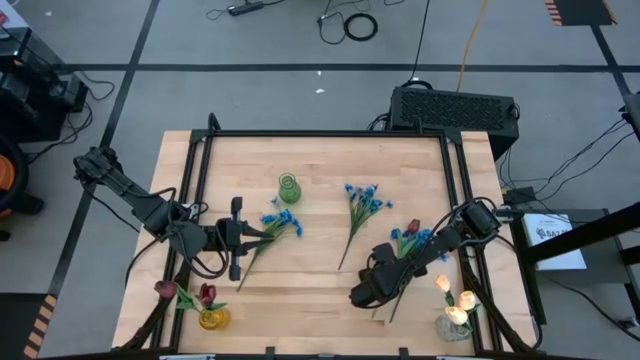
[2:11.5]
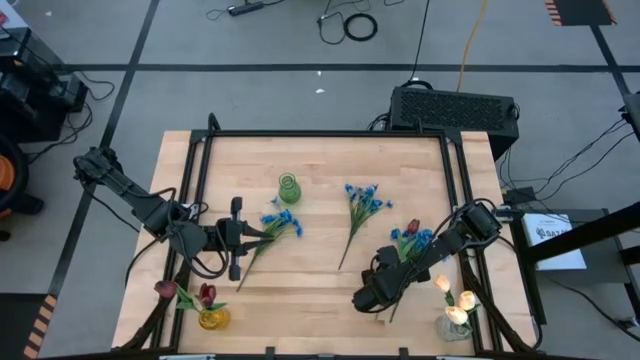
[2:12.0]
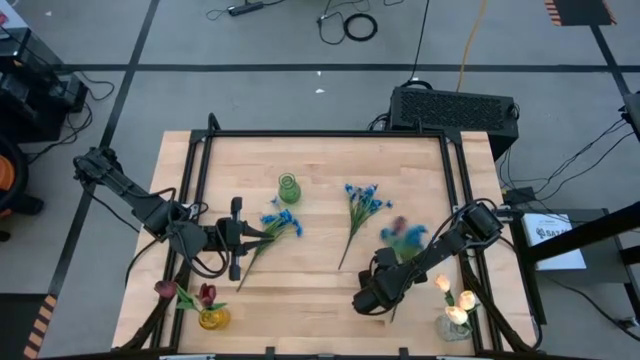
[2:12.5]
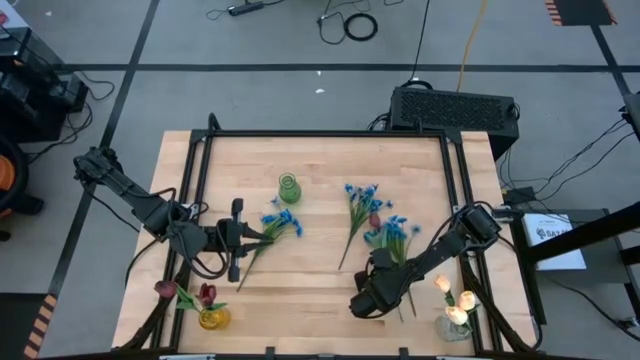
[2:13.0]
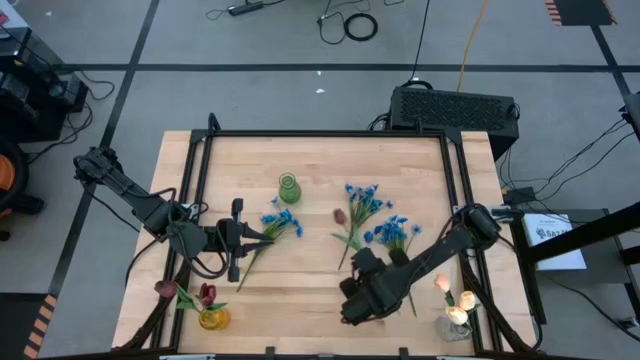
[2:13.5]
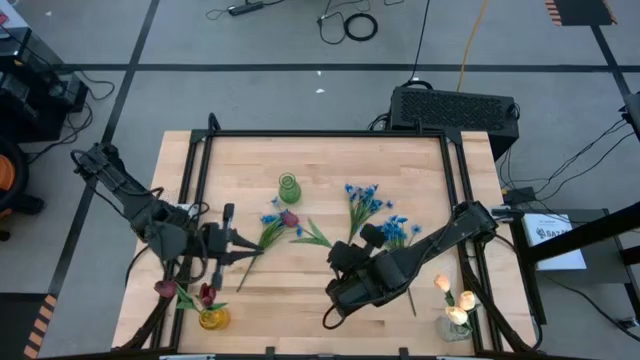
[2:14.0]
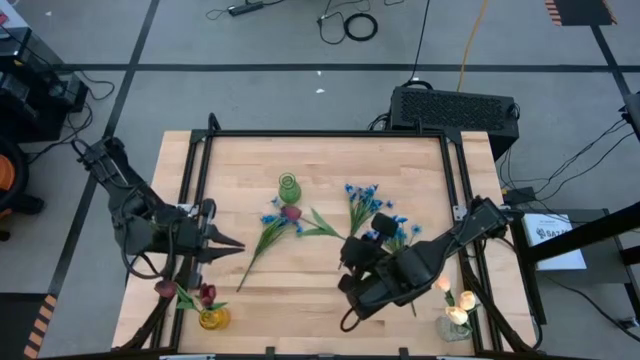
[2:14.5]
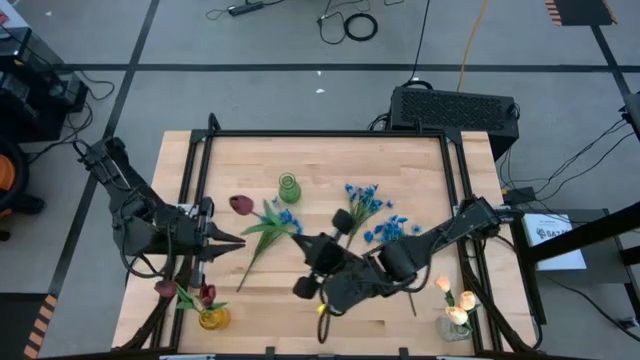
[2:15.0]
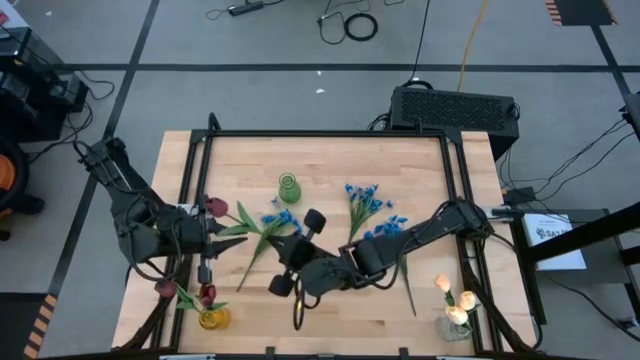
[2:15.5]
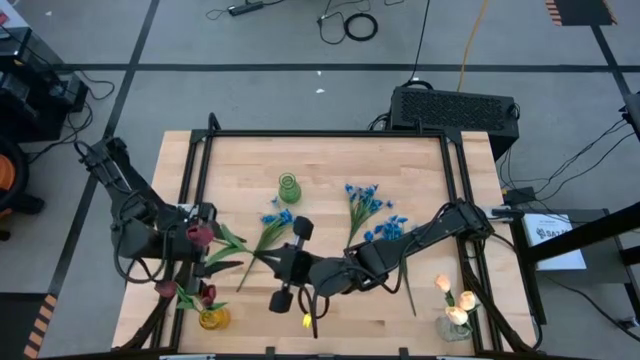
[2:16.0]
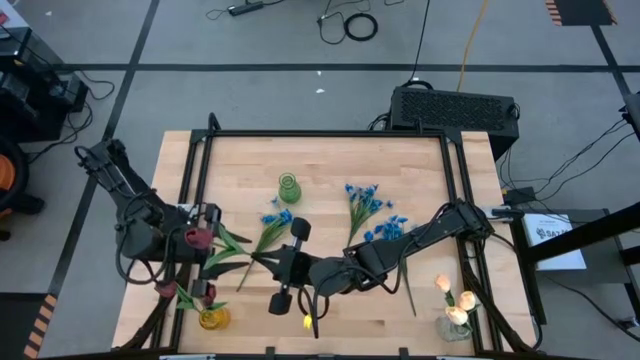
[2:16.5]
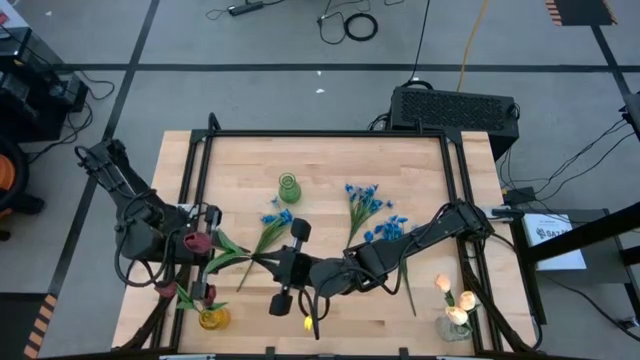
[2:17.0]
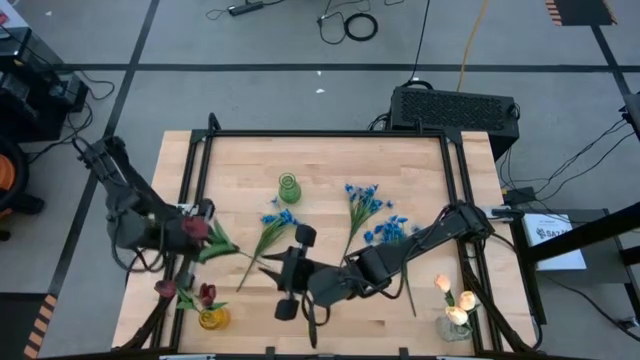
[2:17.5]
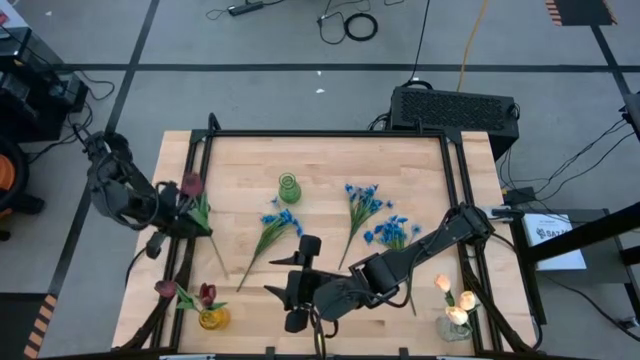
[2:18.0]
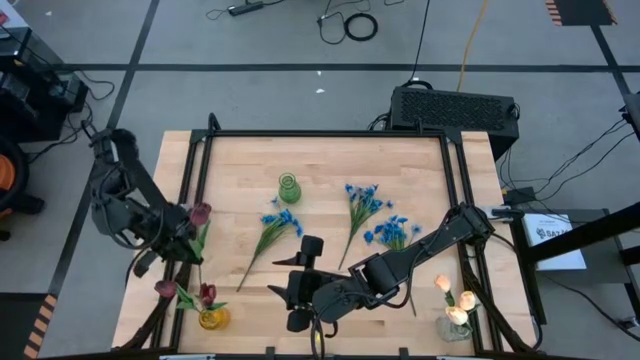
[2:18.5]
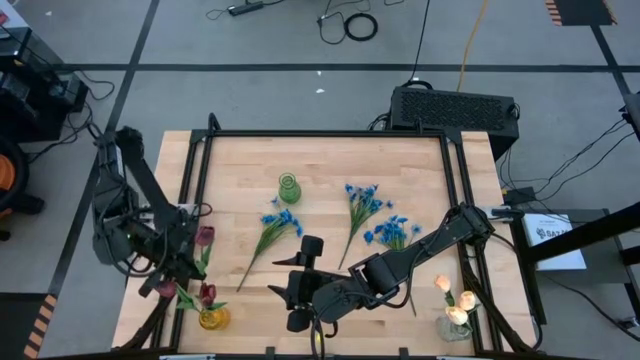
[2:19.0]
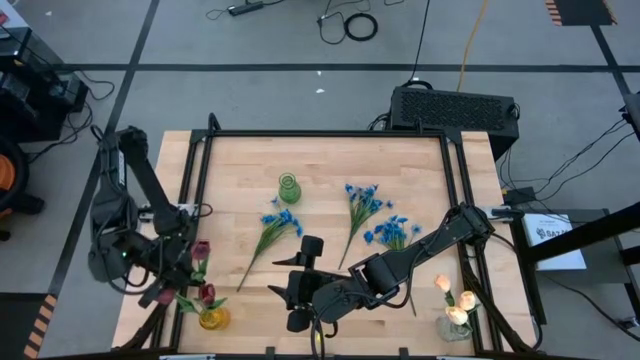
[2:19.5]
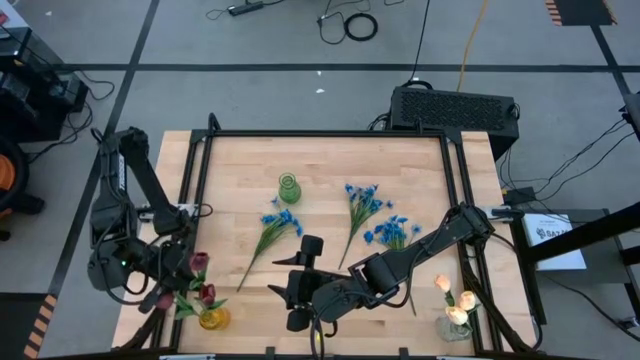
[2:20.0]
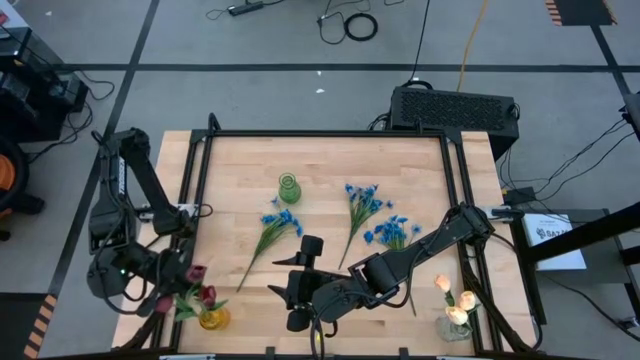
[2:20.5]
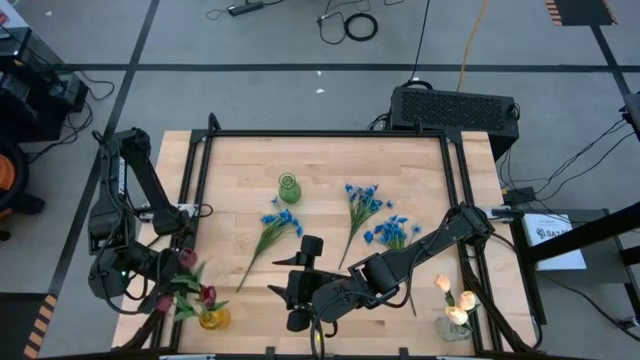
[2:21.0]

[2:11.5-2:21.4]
Task: Sort flowers into vase by color
Put the red flower into the yellow vase

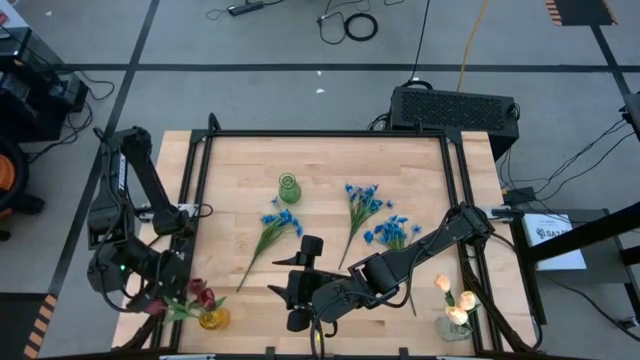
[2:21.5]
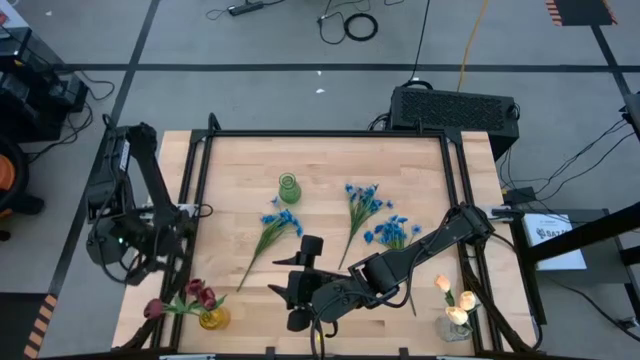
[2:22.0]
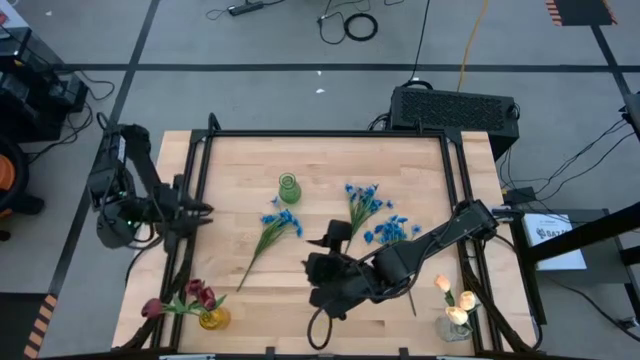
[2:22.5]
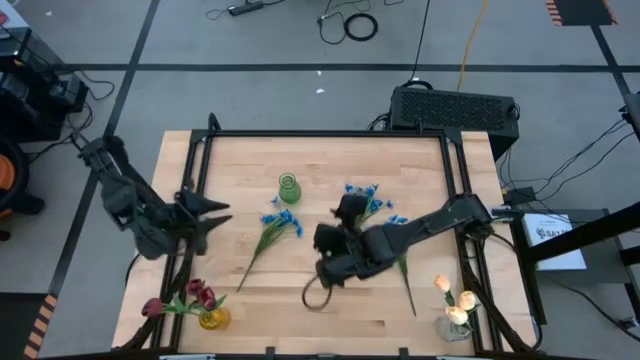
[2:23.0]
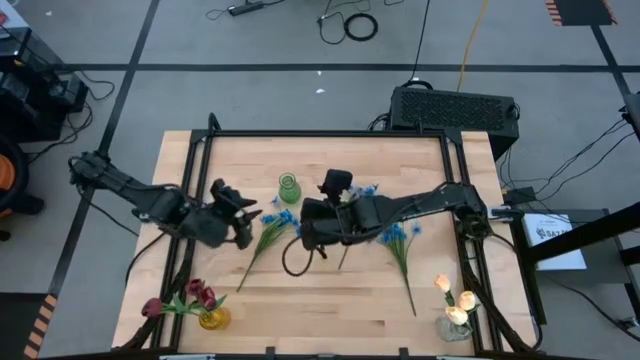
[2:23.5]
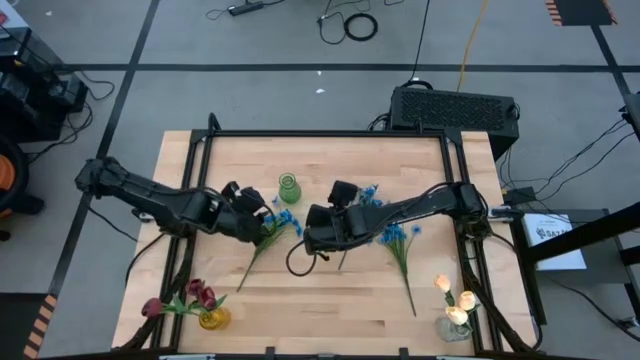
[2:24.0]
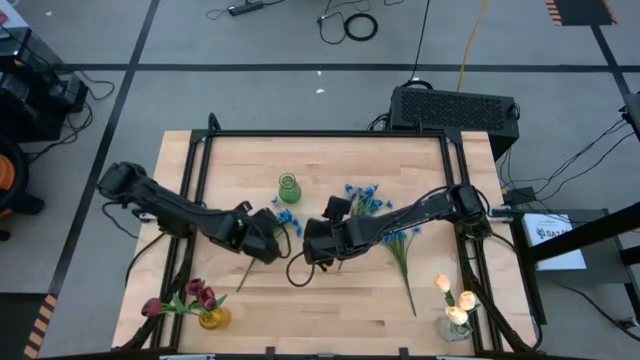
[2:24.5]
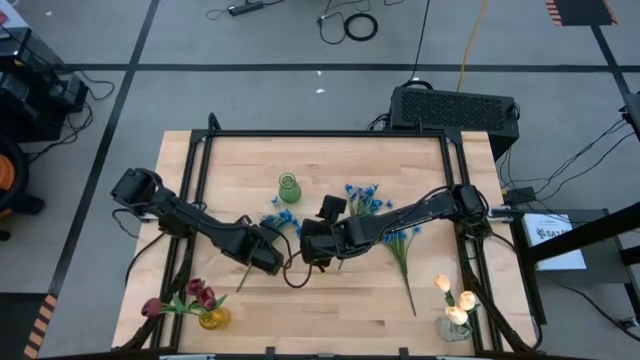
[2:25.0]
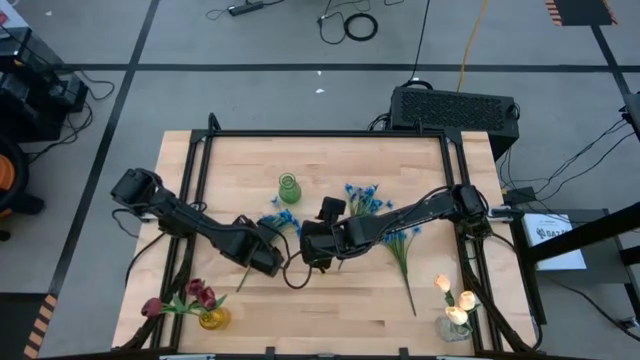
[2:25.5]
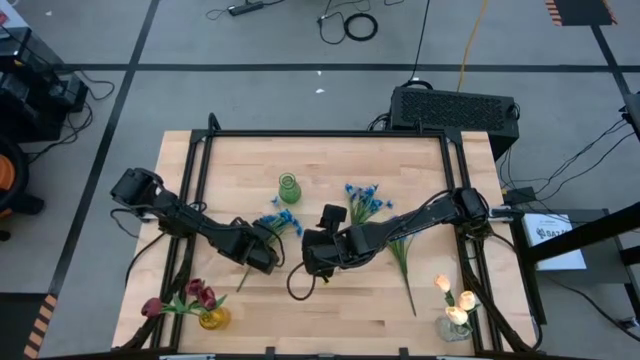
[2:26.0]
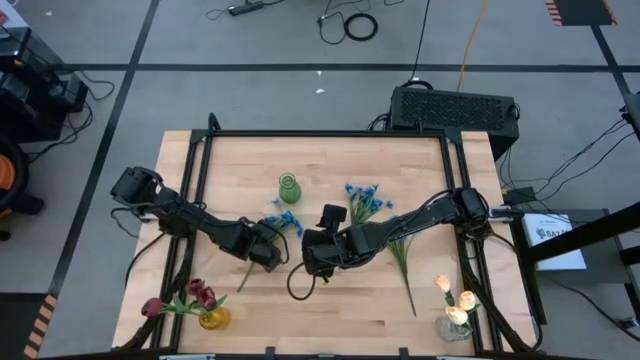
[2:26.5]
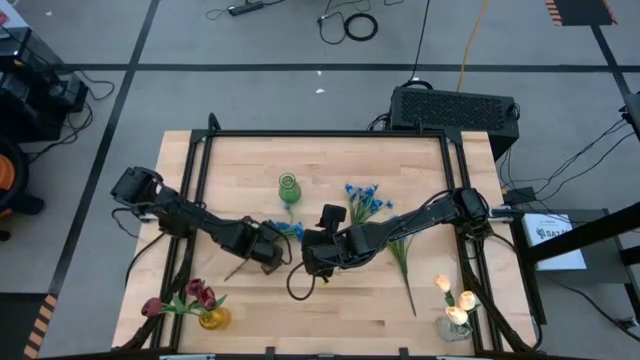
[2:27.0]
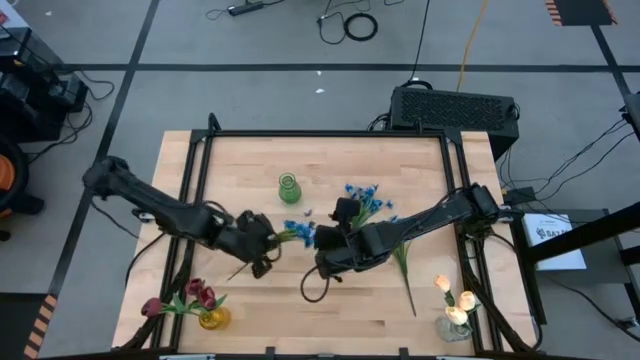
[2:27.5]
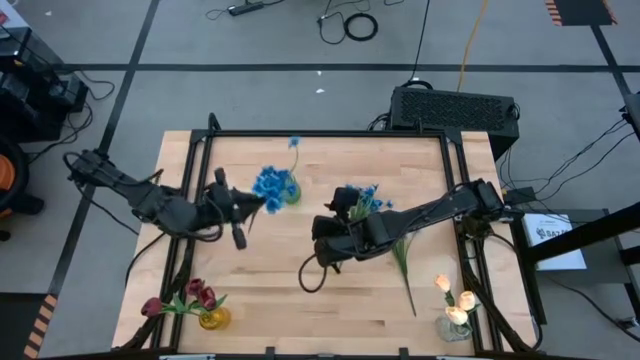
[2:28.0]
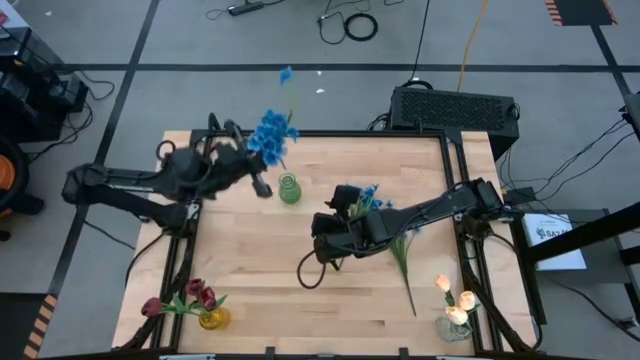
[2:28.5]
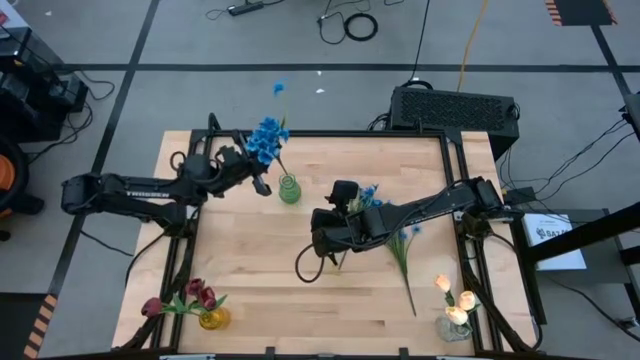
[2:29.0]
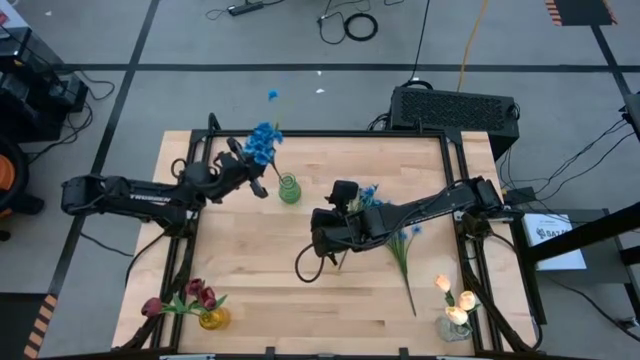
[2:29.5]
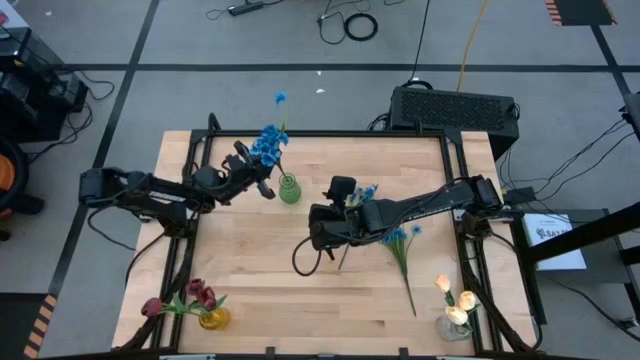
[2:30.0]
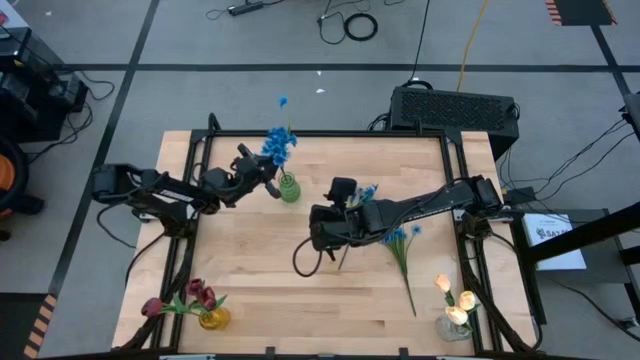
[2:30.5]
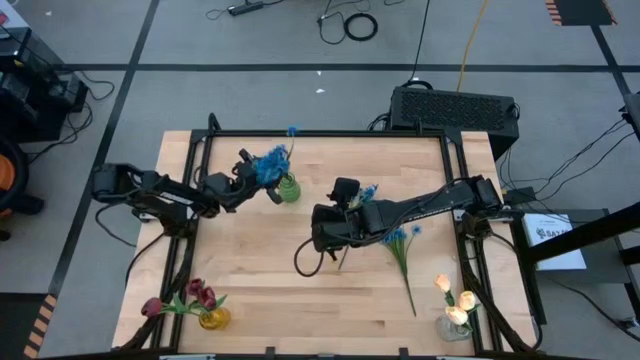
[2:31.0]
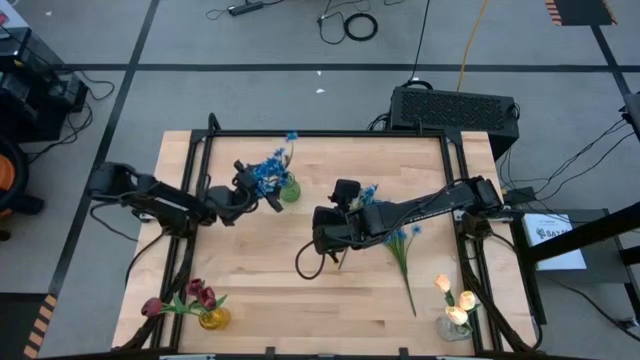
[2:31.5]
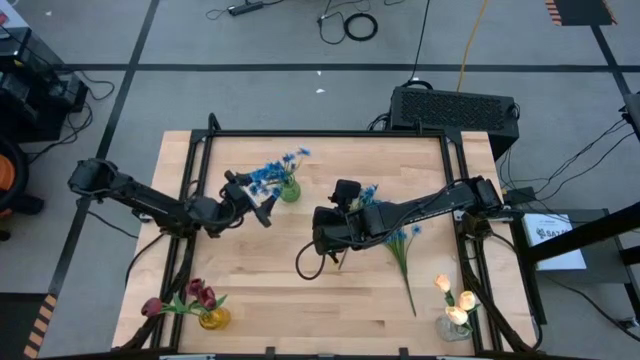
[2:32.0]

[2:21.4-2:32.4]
Put the left blue flowers into the green vase

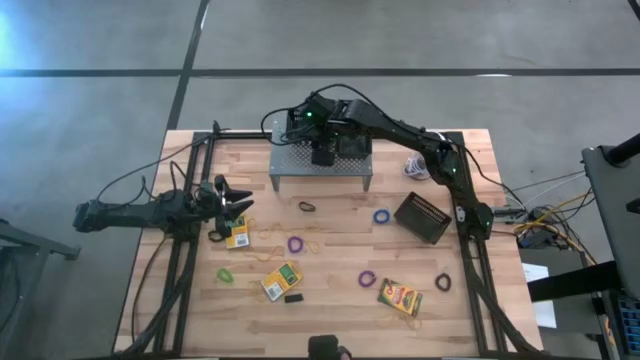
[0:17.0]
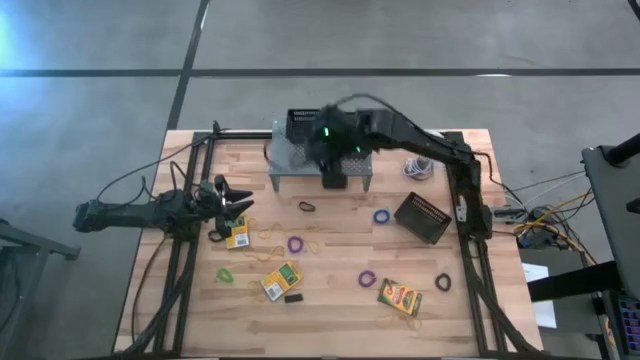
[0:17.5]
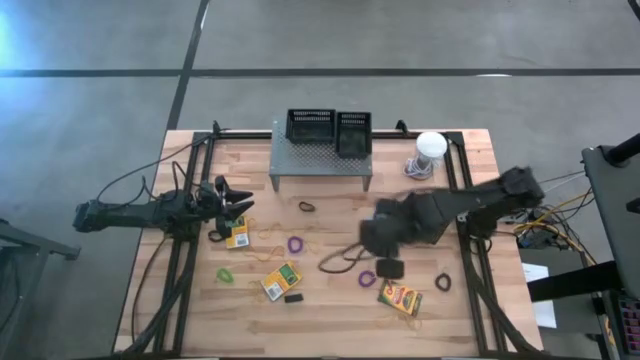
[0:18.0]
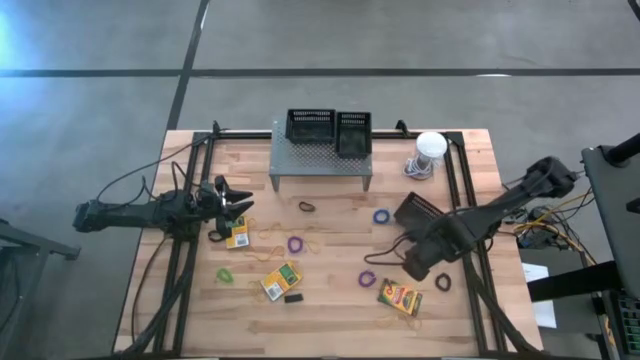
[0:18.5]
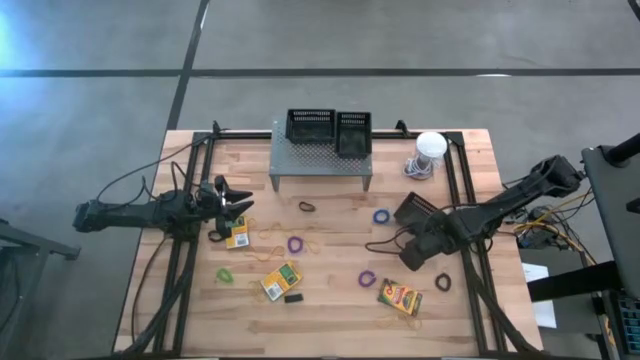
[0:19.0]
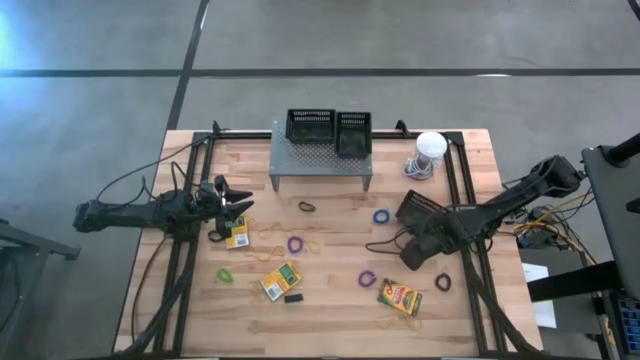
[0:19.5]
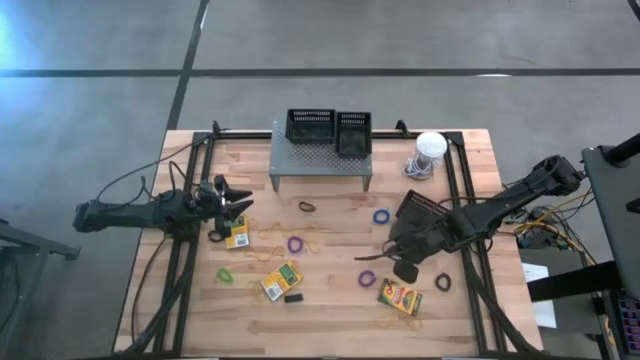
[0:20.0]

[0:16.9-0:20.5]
Task: Pick & Place Office Desk Supplies
Put the black bin on the shelf
